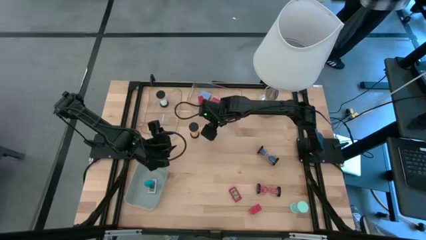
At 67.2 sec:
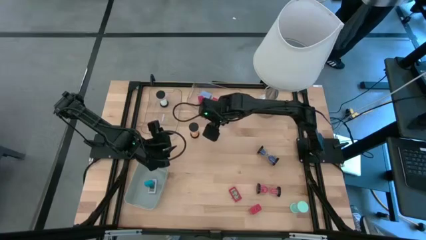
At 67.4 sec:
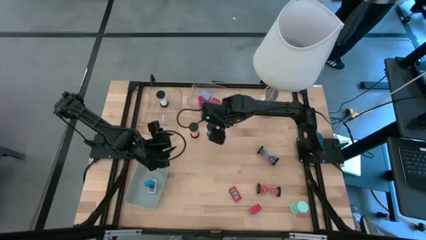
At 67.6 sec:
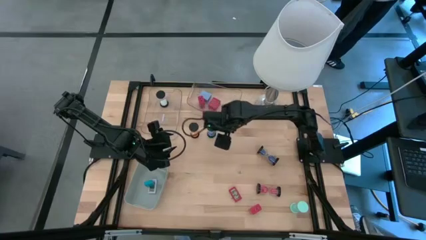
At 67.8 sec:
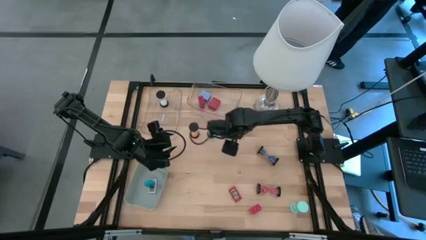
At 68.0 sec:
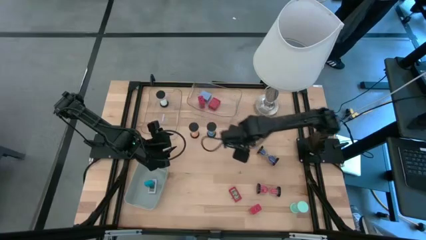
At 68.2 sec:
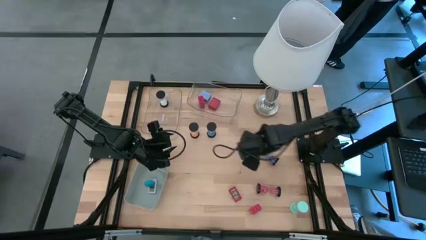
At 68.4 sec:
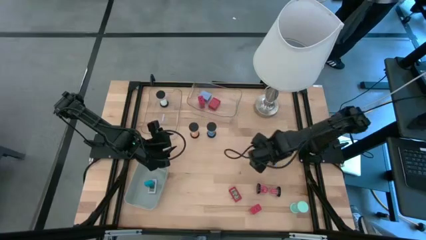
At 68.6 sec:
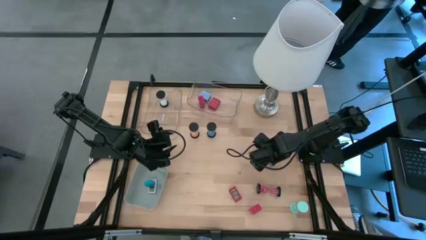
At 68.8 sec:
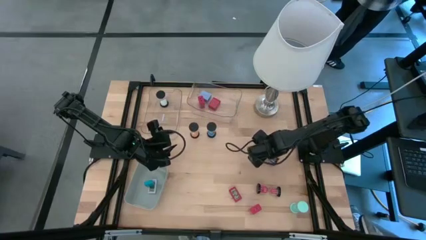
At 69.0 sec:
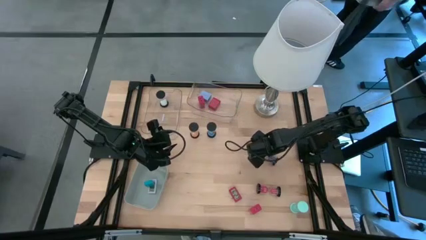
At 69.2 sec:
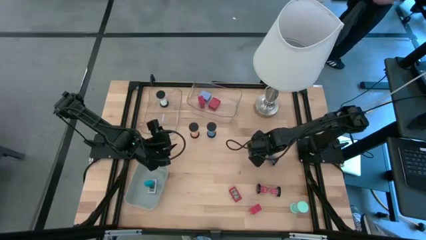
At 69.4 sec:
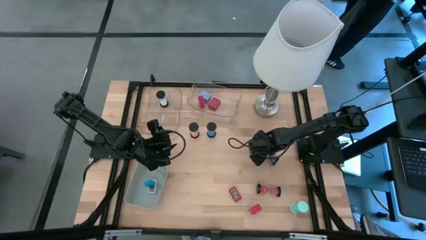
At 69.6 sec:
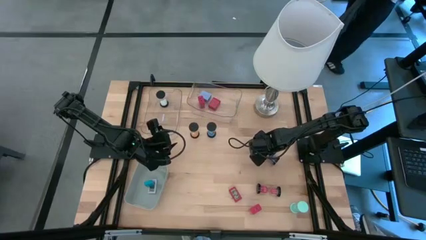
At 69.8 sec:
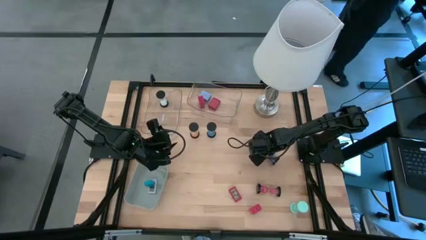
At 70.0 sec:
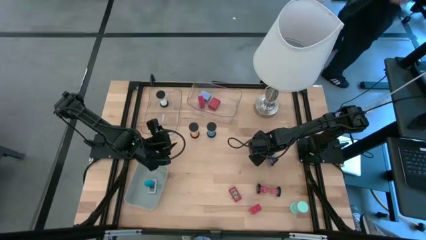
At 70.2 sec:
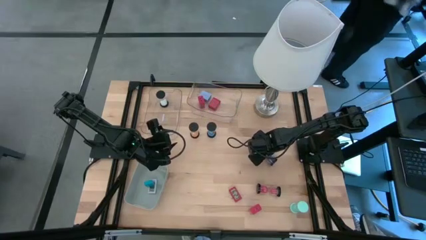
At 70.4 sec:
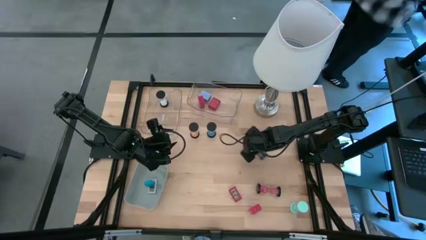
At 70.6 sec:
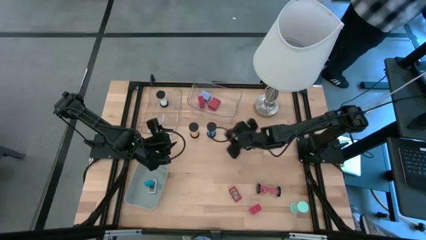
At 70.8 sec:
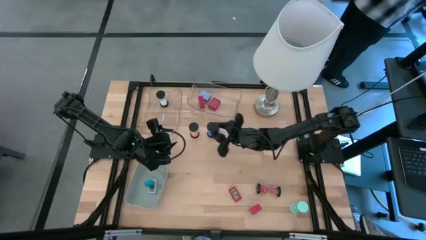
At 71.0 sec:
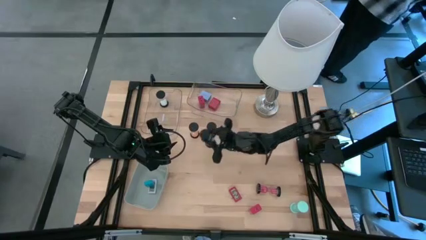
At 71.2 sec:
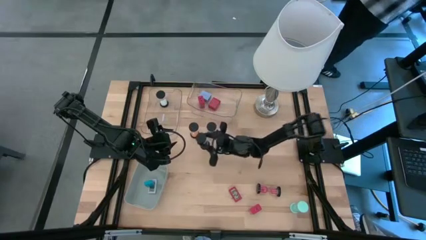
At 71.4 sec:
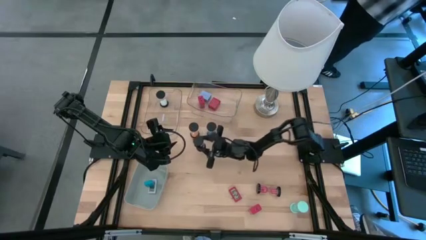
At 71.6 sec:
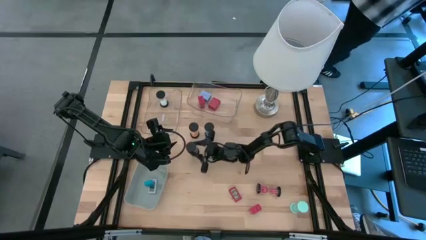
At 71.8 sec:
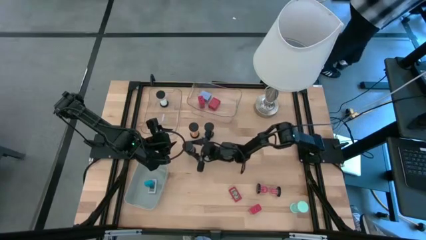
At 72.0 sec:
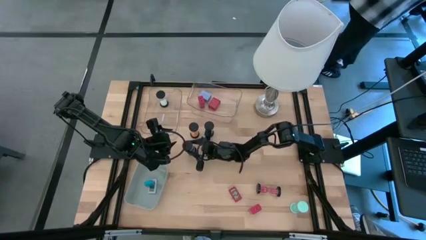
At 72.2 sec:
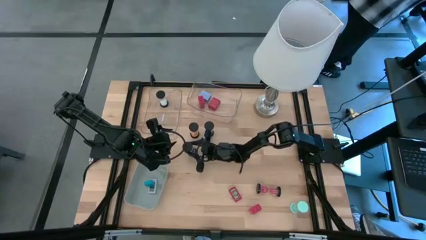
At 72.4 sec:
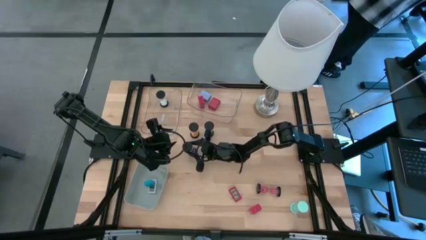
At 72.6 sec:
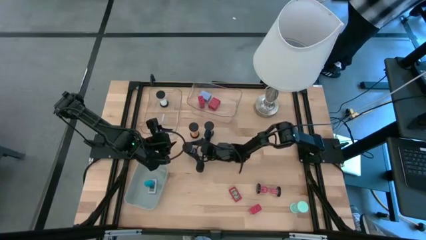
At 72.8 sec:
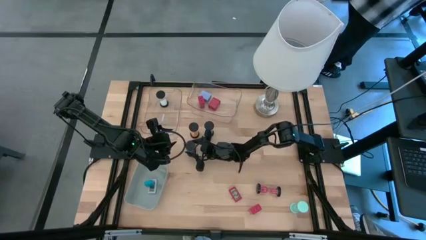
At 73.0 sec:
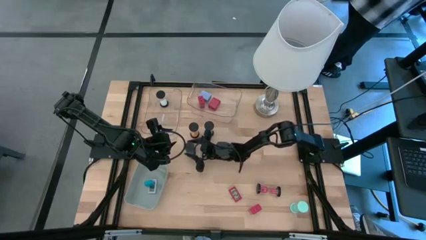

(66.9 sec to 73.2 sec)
Task: Pick & Place Office items
Move the dark blue hourglass from the right to the left side of the table

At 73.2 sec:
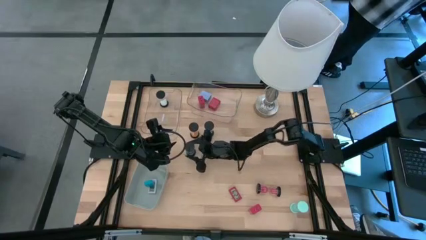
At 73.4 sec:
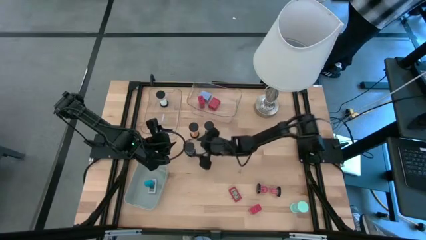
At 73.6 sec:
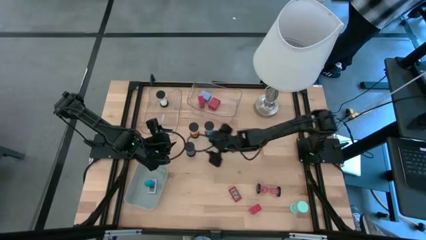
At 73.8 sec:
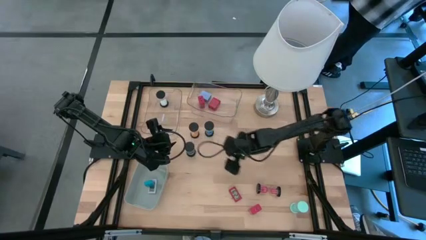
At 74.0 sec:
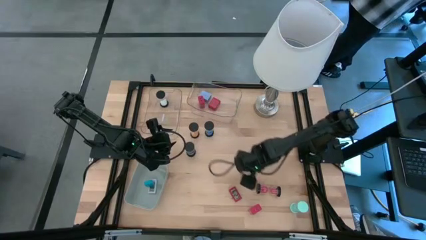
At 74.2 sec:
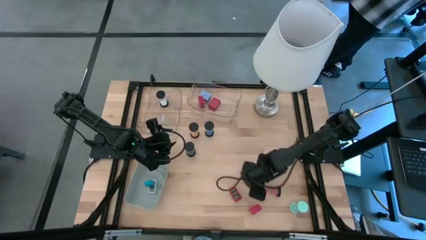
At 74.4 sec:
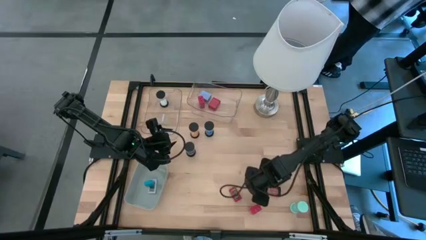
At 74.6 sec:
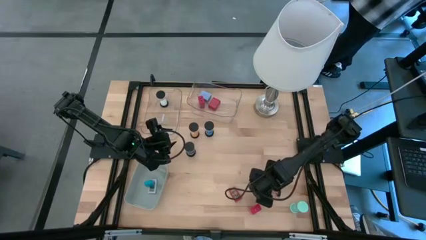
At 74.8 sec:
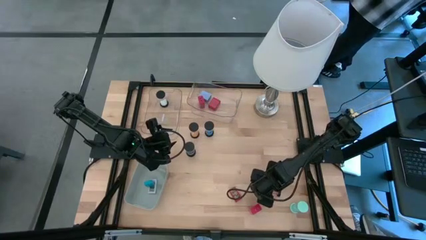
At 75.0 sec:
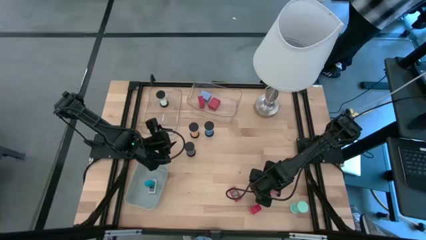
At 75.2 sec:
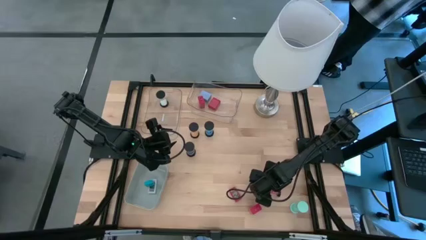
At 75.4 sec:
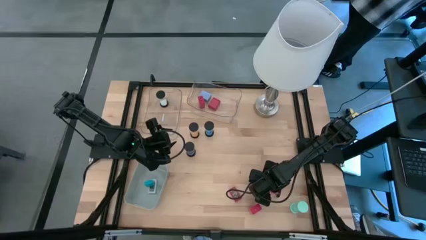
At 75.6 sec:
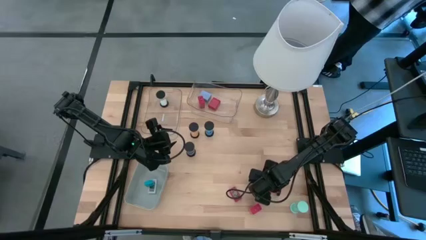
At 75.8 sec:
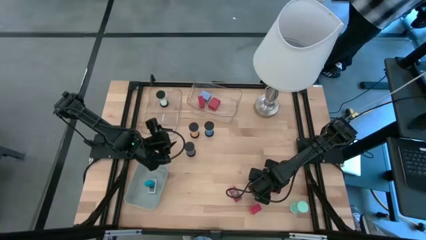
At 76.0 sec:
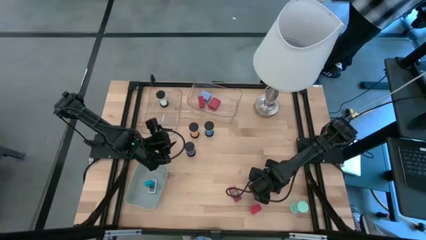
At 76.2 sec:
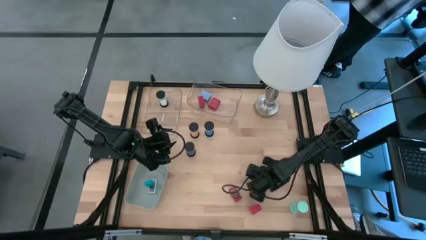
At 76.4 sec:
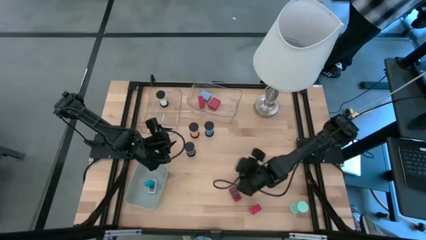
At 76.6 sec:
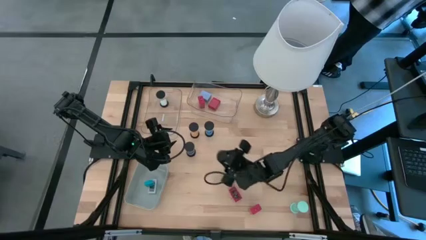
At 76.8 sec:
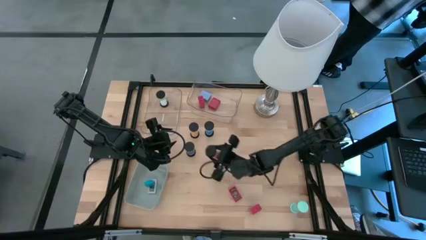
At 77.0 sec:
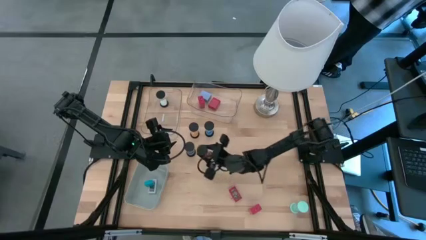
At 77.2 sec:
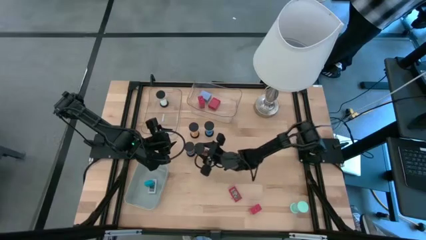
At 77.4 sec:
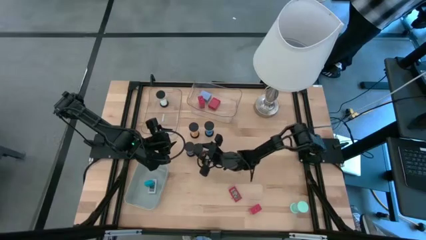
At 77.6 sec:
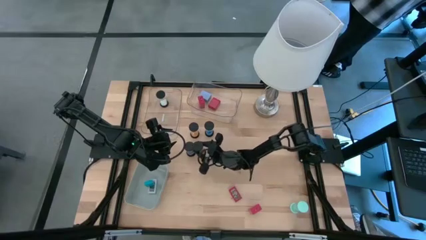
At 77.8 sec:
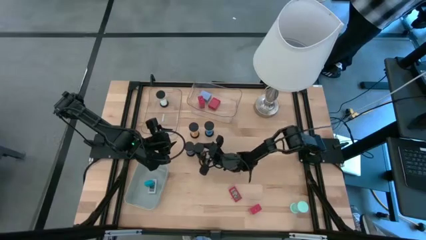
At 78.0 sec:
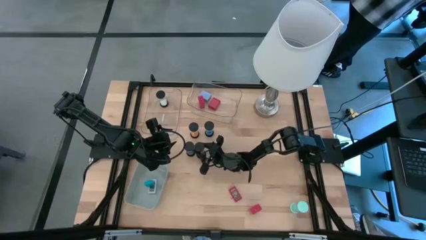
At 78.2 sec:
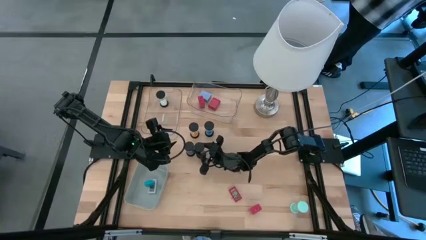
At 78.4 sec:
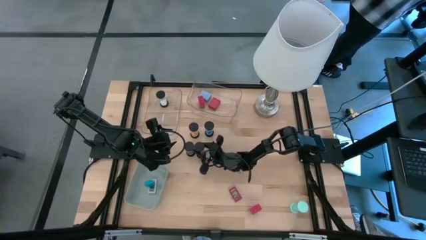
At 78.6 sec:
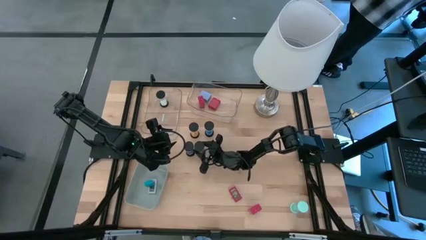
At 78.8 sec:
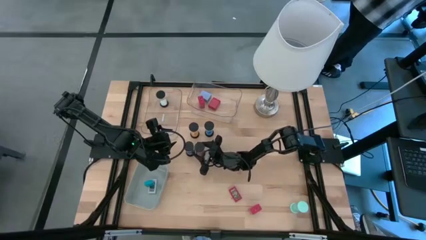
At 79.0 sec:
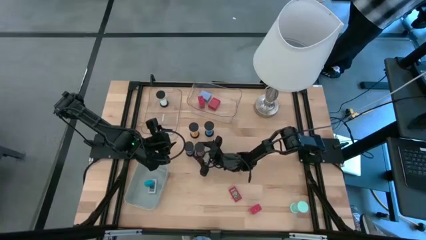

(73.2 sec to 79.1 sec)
Move the pink hourglass from the right to the center of the table

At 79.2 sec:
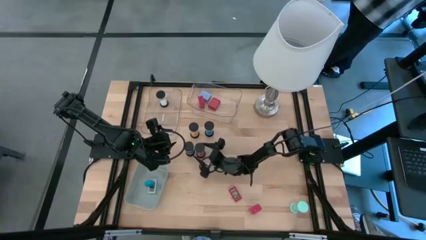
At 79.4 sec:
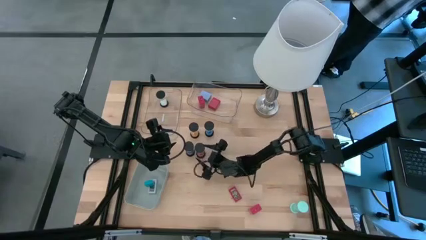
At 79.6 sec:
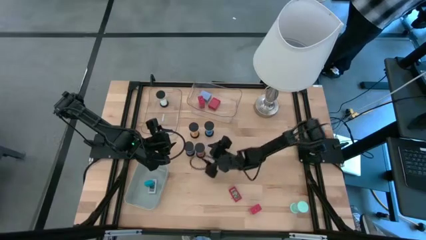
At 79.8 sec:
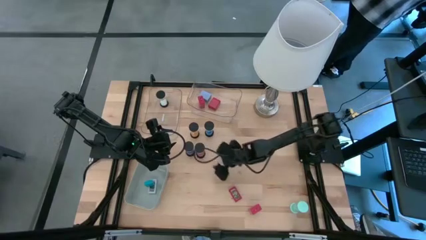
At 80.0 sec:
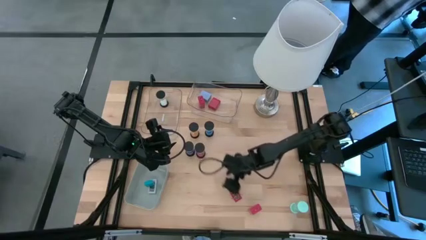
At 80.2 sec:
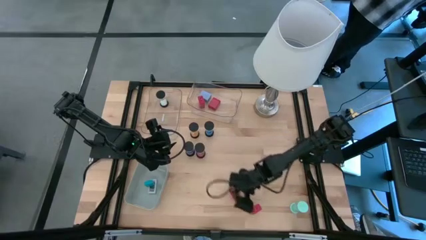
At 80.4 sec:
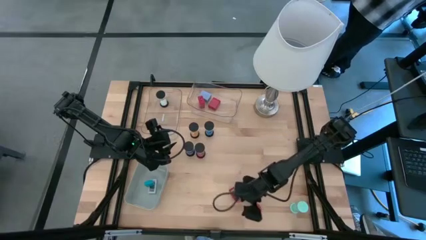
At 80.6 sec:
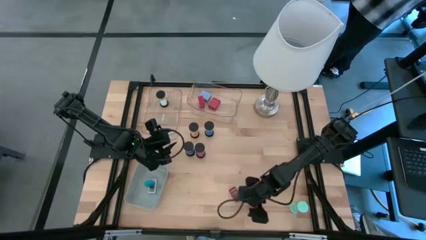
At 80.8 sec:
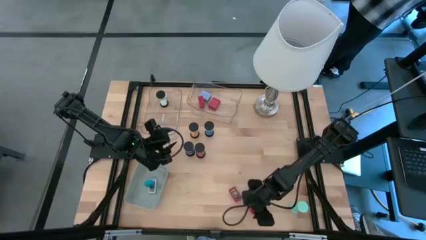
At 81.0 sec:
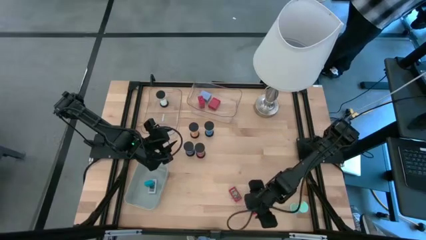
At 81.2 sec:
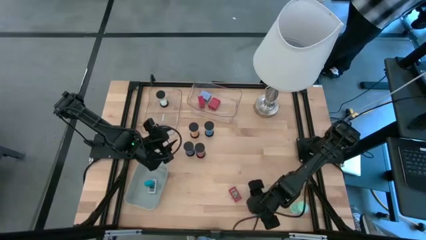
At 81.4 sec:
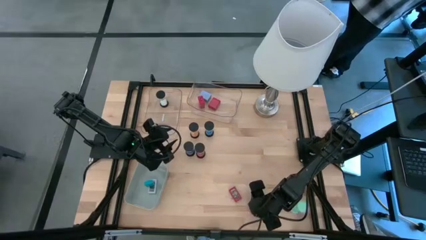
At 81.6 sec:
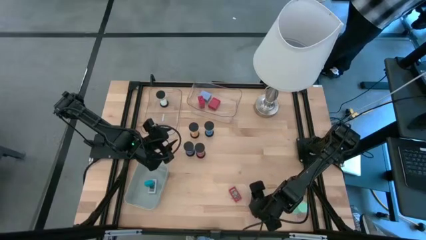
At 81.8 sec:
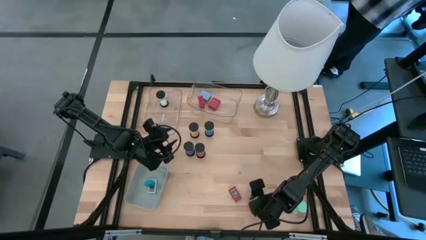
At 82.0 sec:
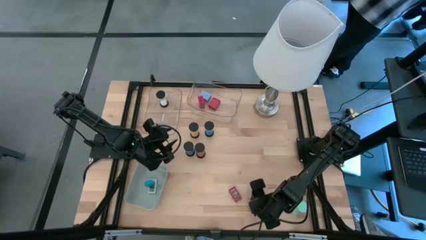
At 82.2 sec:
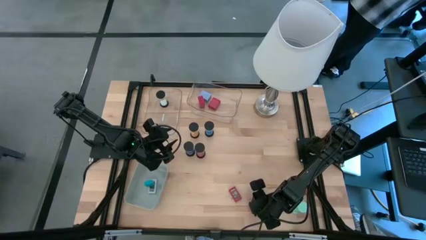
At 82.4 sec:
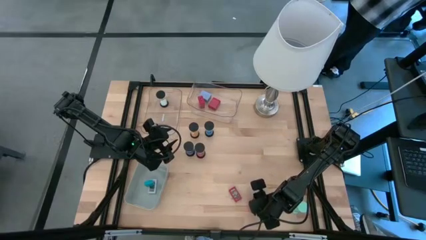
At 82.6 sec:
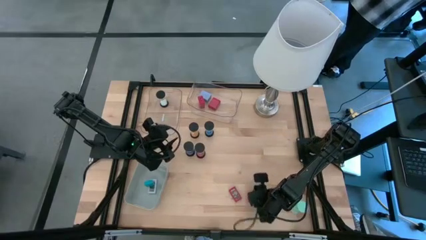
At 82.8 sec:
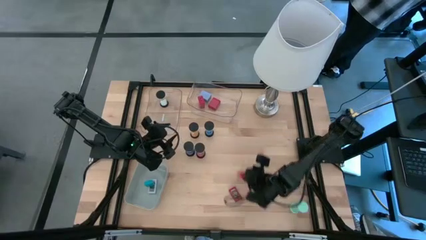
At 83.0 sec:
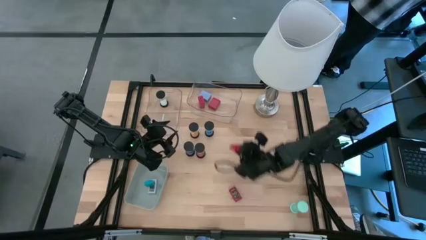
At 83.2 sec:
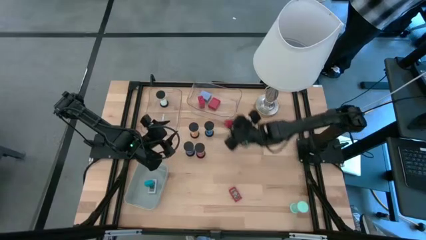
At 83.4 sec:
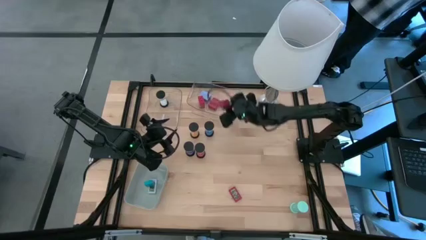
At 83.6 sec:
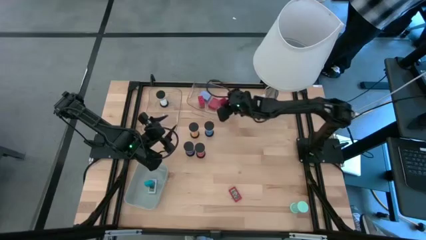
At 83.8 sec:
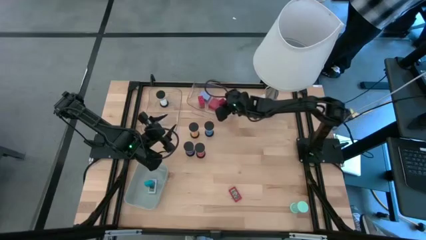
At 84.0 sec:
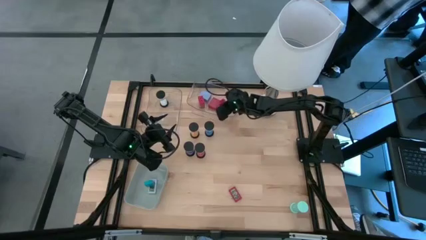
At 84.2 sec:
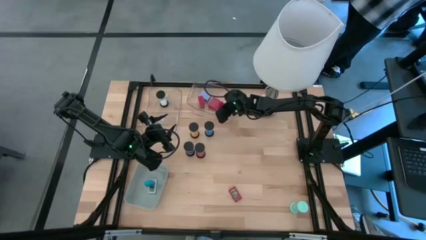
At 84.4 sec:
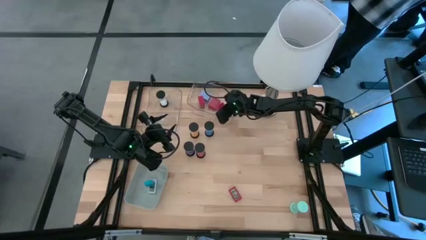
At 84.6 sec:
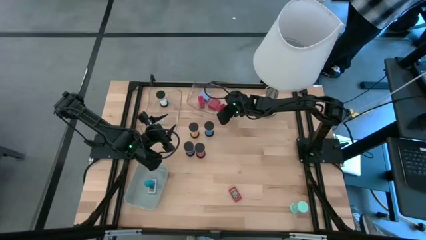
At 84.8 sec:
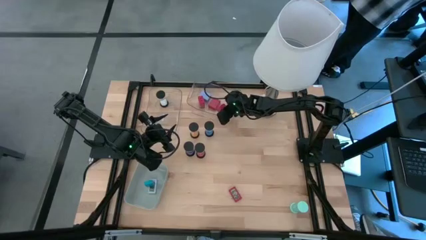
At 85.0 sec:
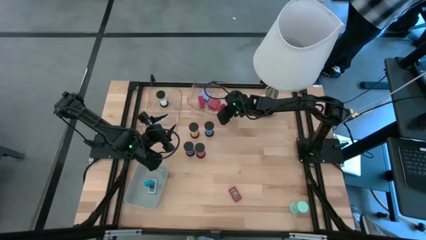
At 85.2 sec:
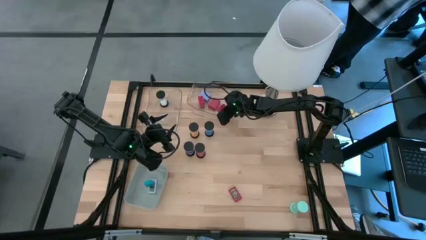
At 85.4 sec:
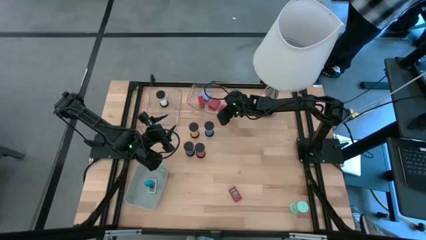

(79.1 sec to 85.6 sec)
Put the red digital timer into the right transparent bin
